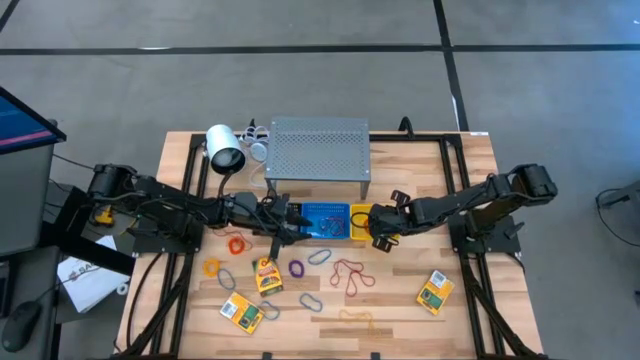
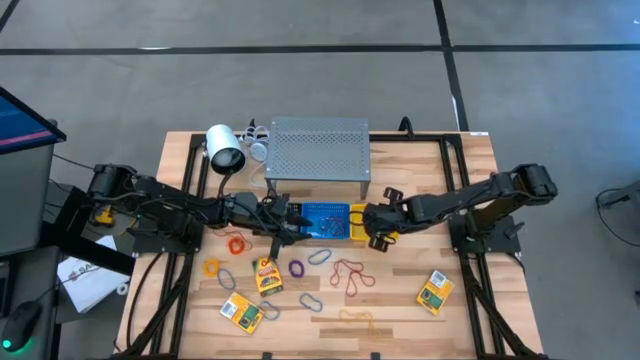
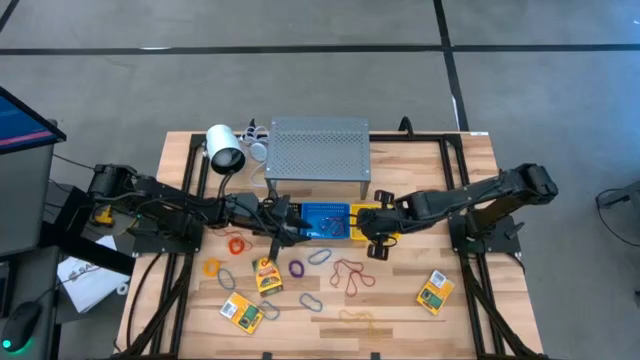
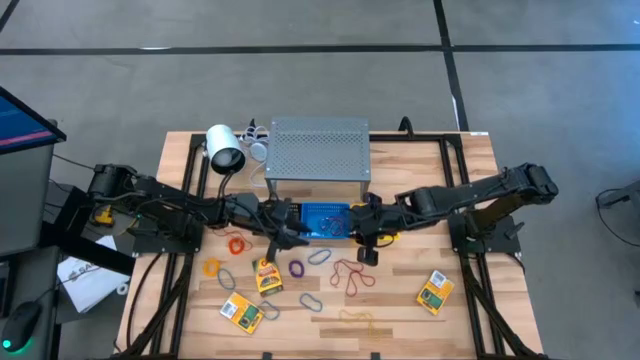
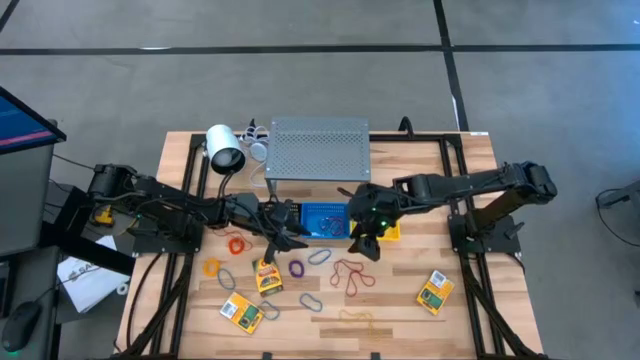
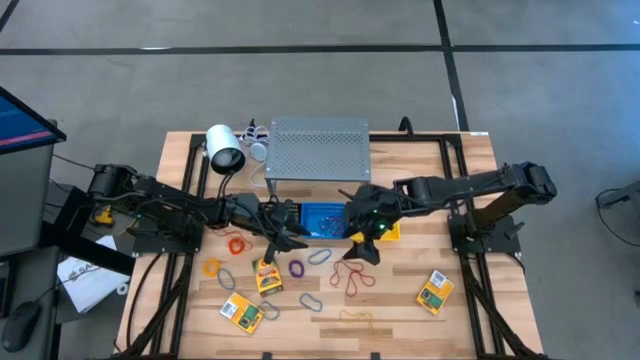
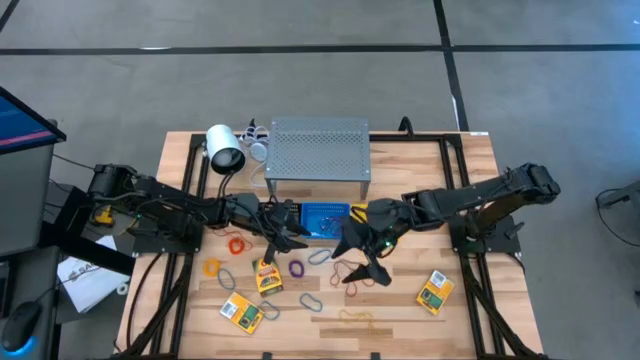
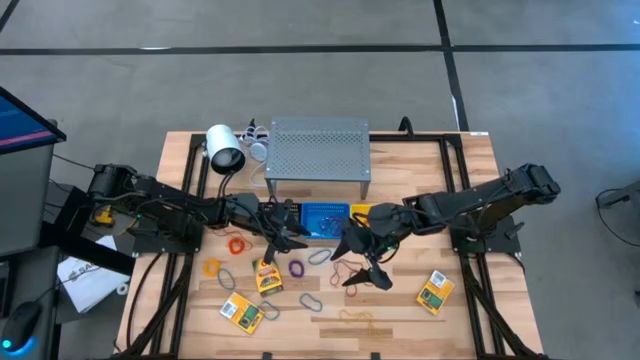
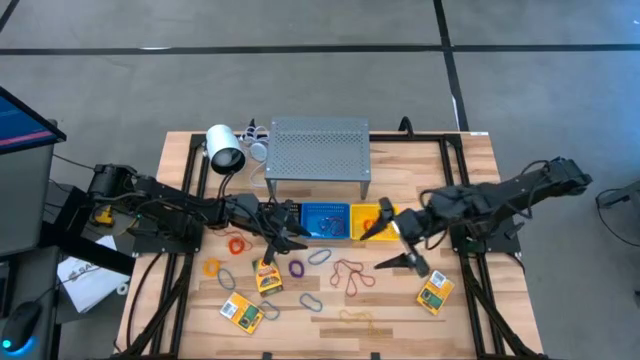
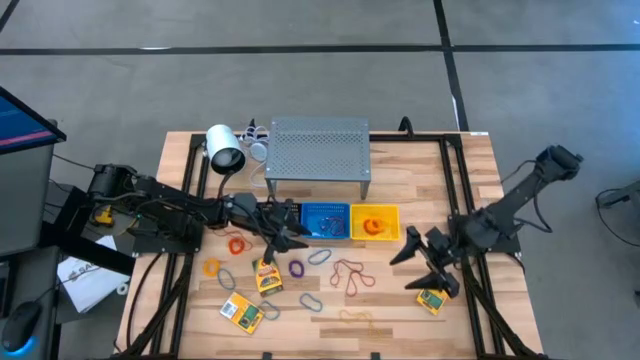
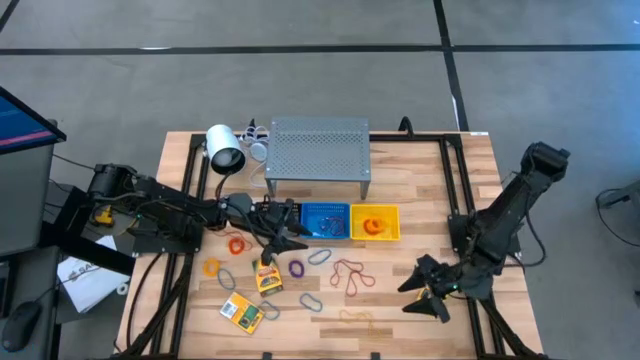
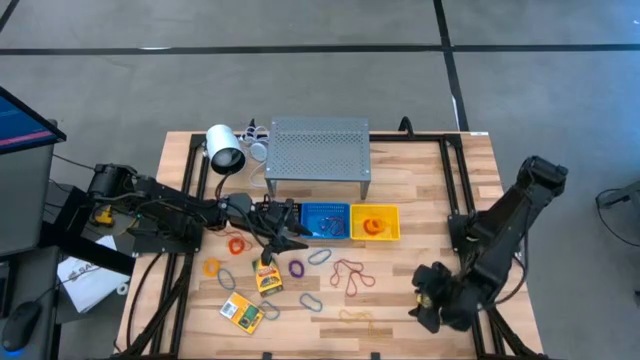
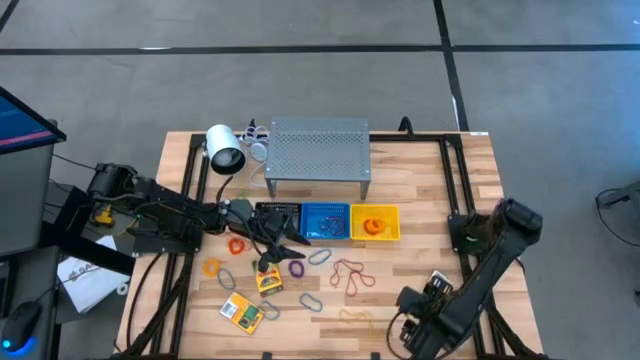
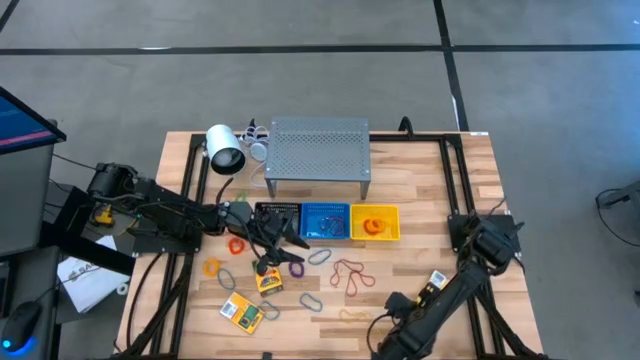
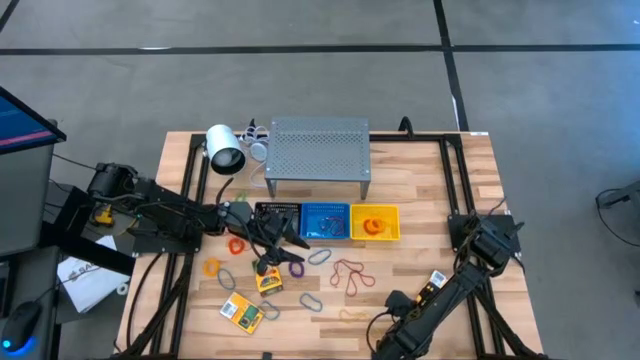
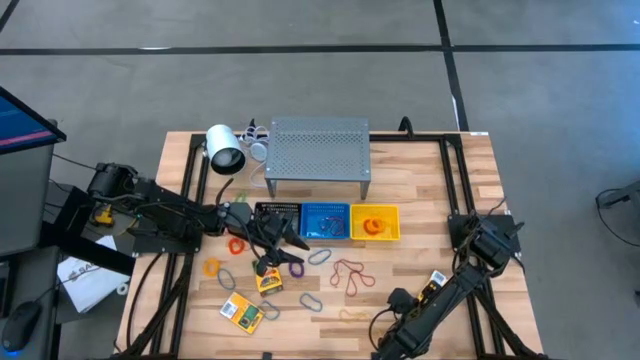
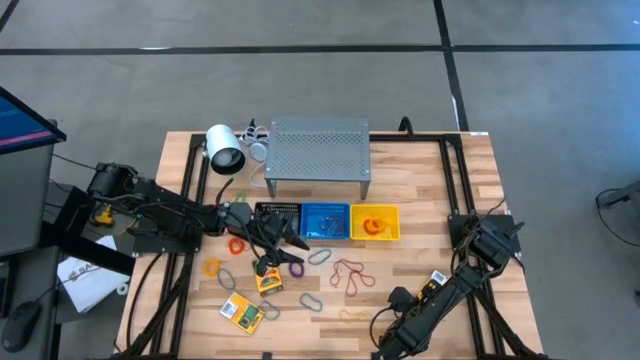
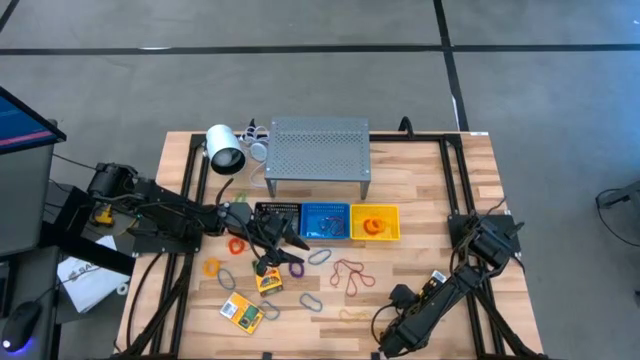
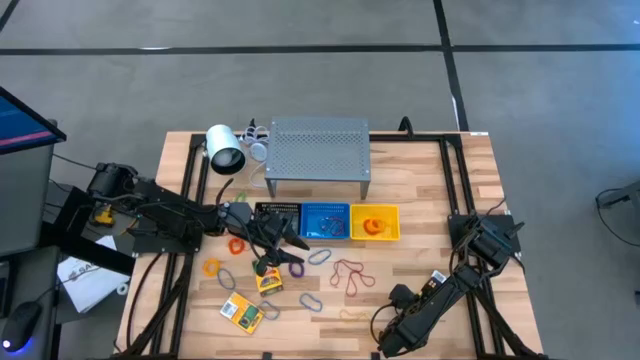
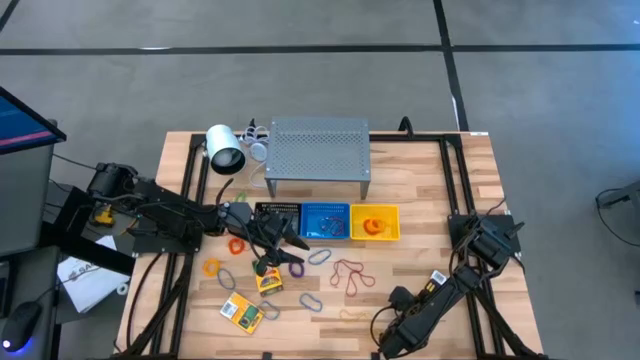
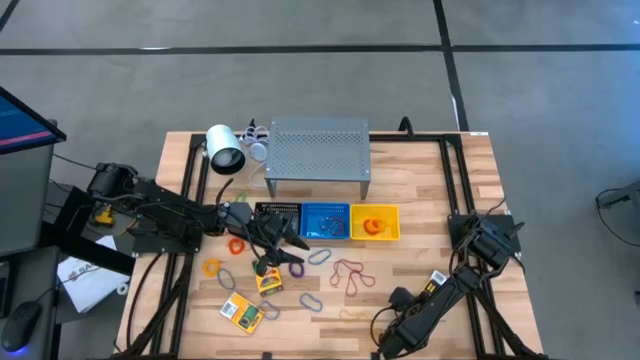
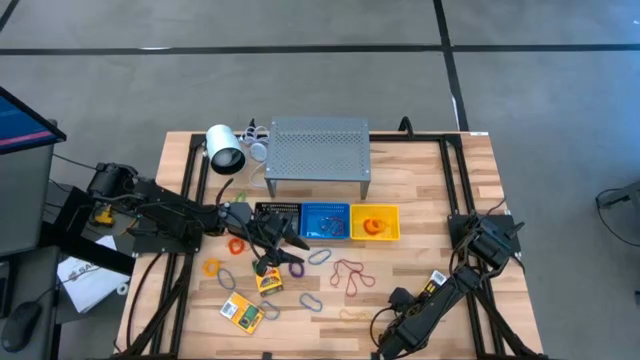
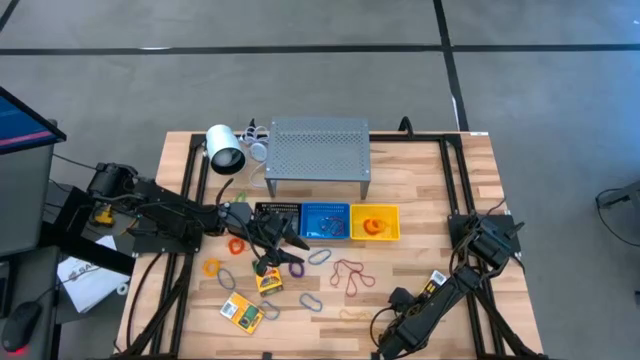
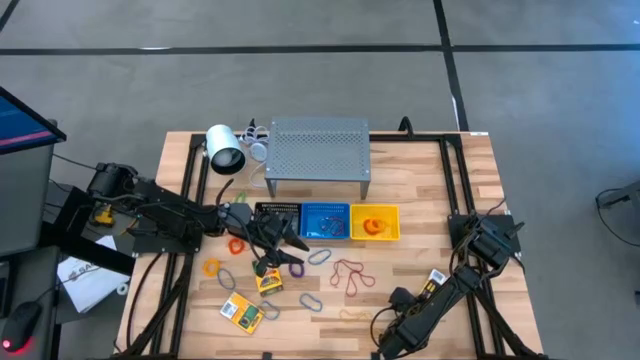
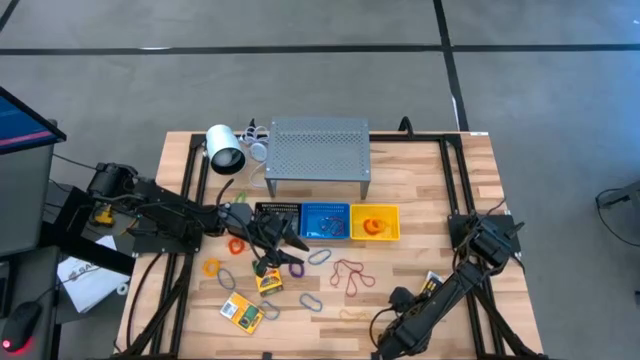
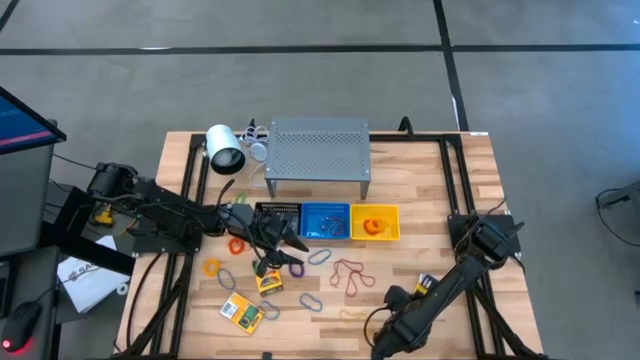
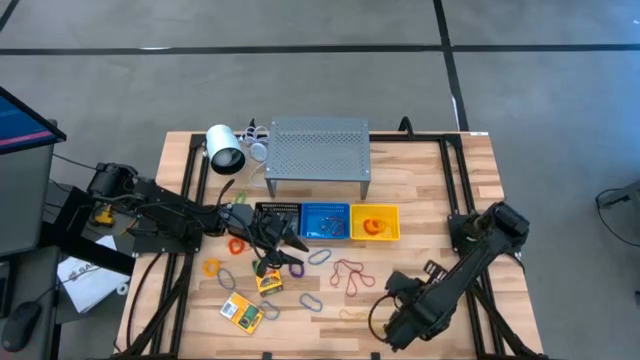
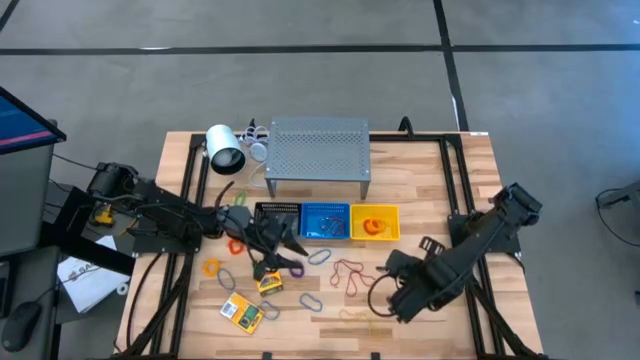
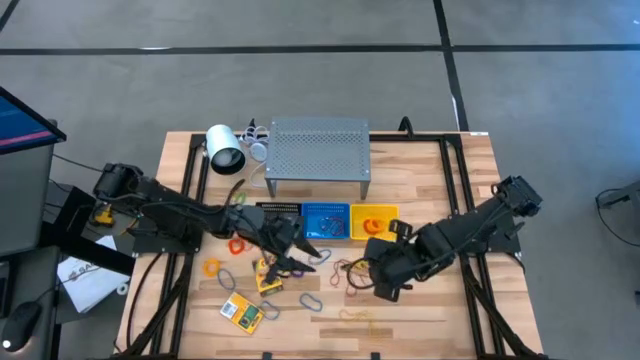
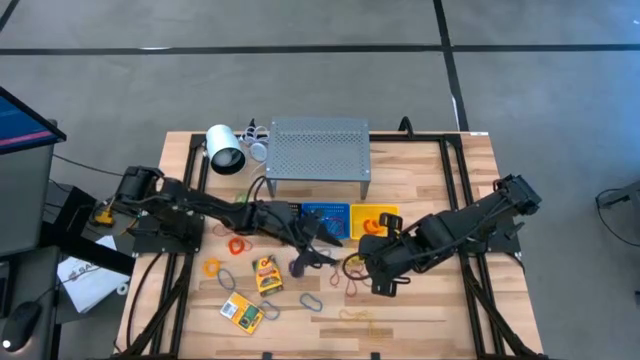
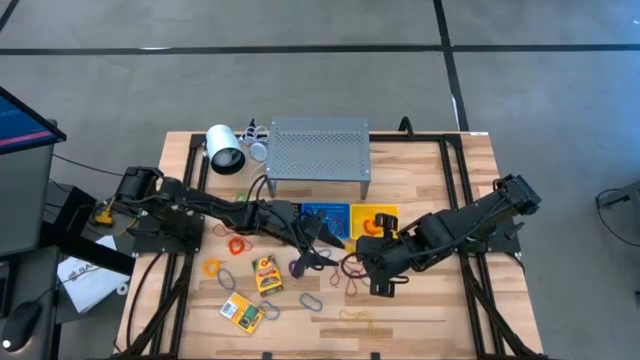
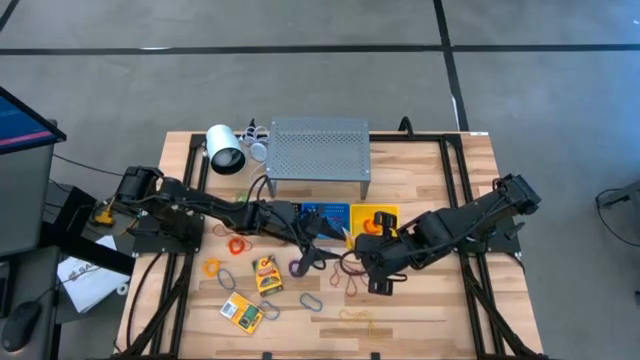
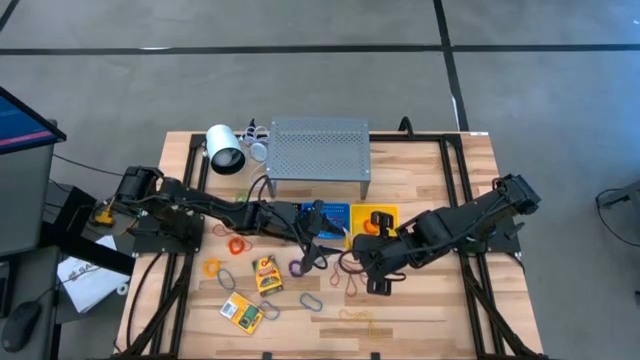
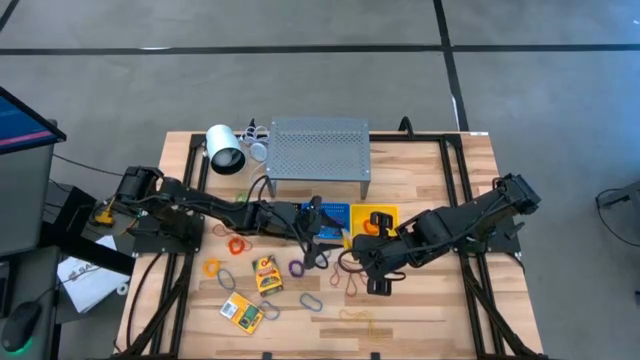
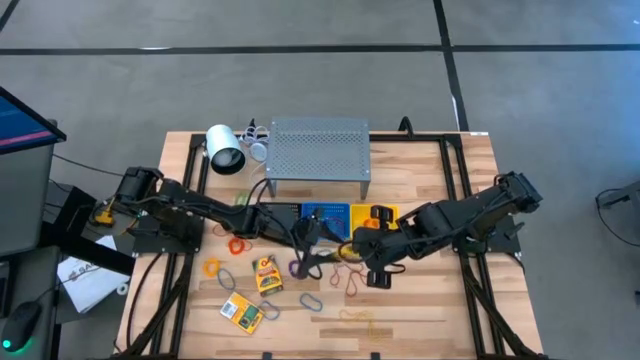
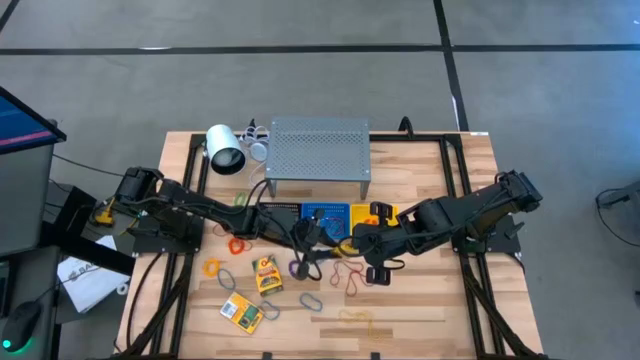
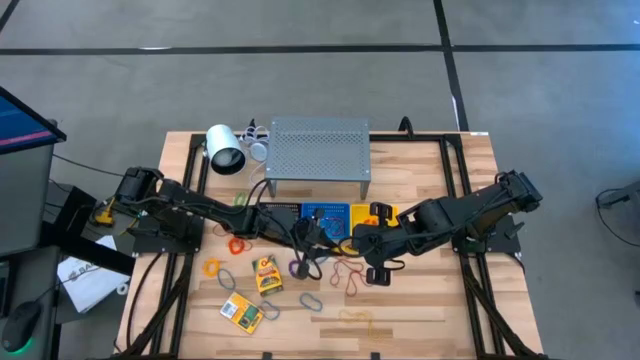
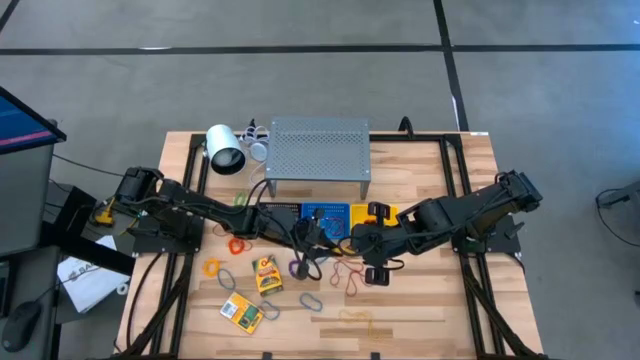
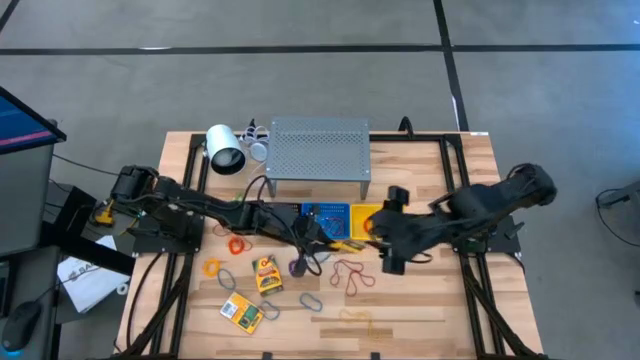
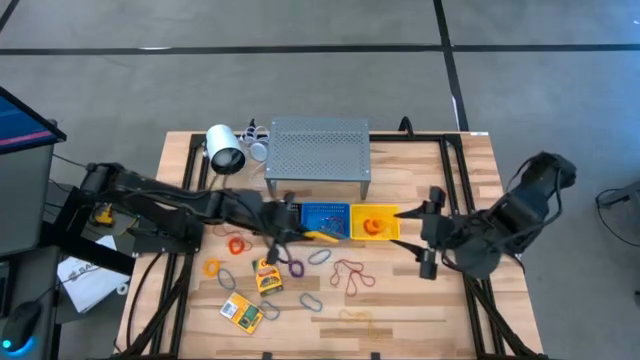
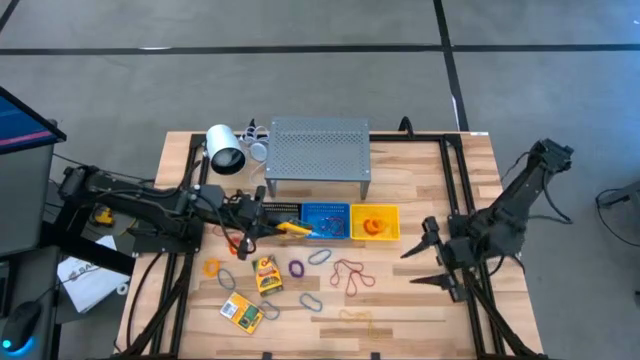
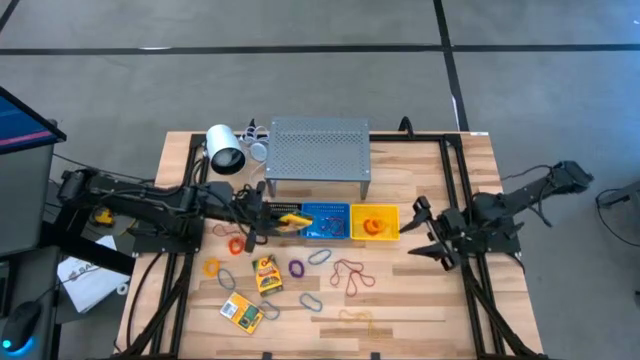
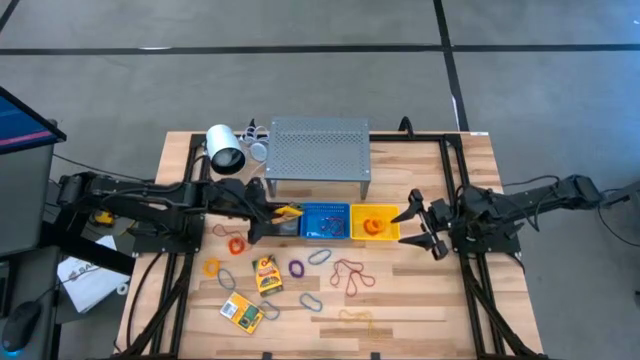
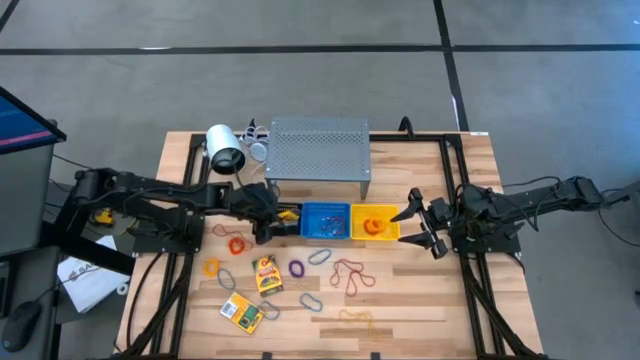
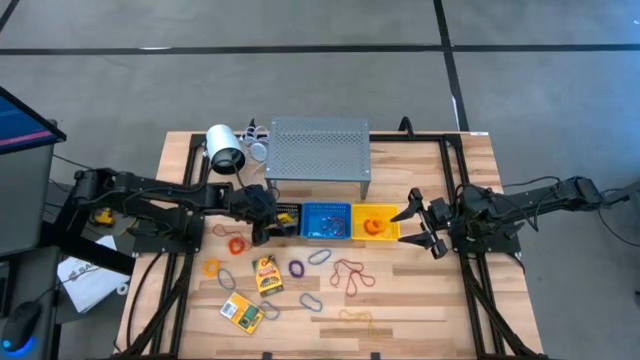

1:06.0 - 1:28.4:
Task: Pick & Place Office Desk Supplies
Put the right box of crayons into the black bin
